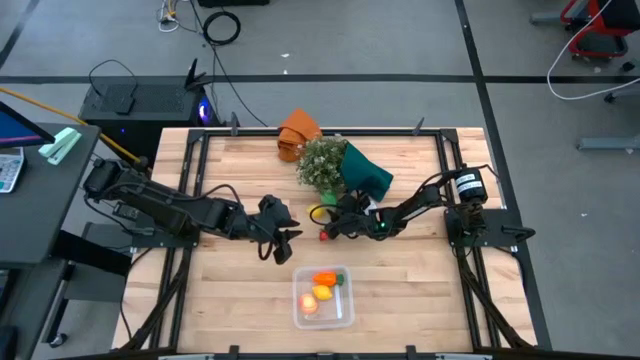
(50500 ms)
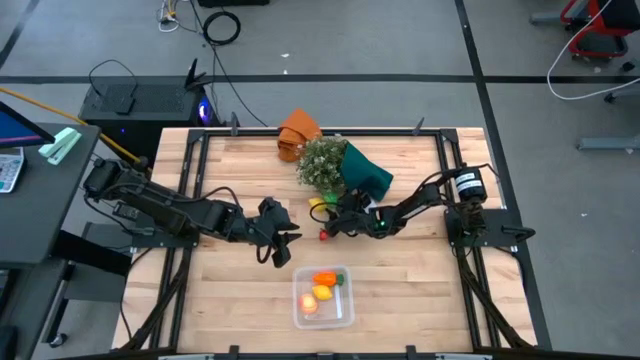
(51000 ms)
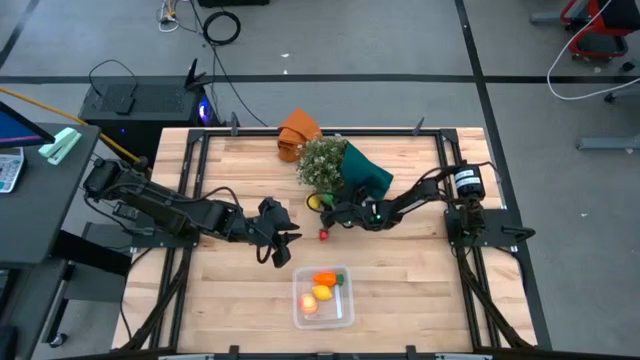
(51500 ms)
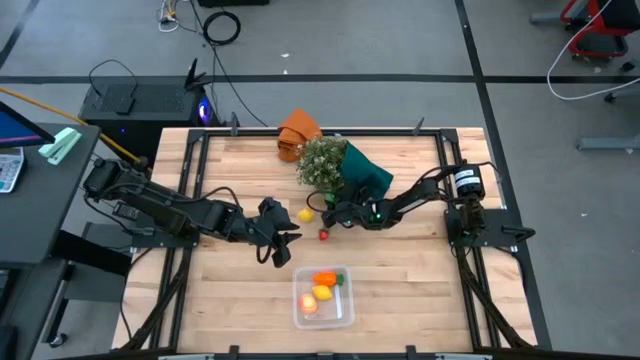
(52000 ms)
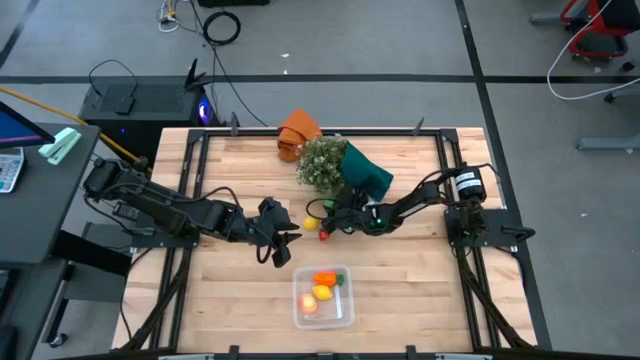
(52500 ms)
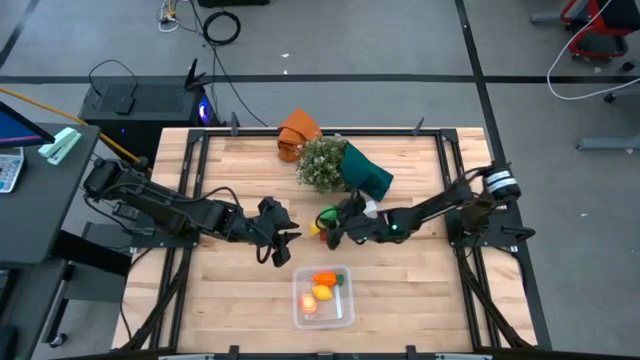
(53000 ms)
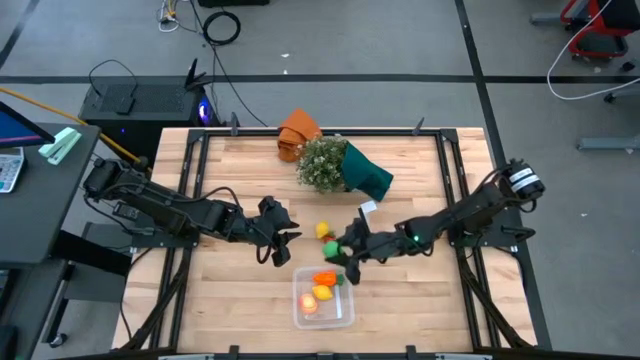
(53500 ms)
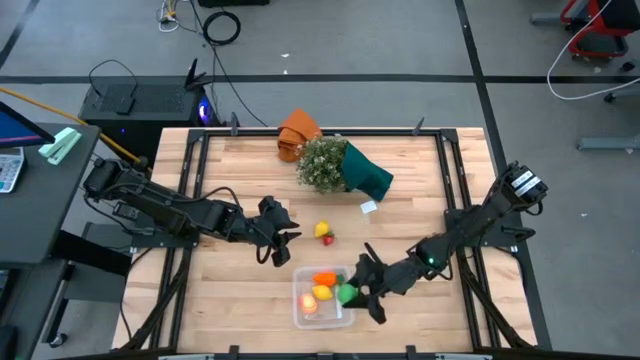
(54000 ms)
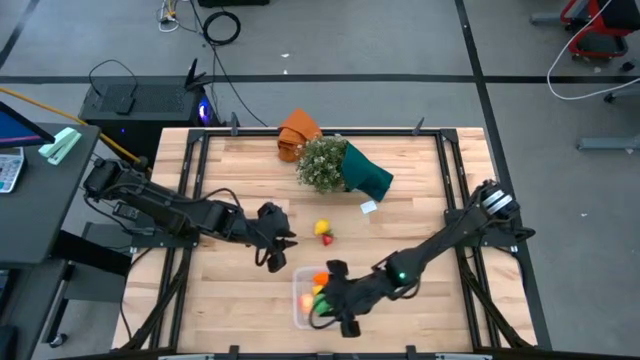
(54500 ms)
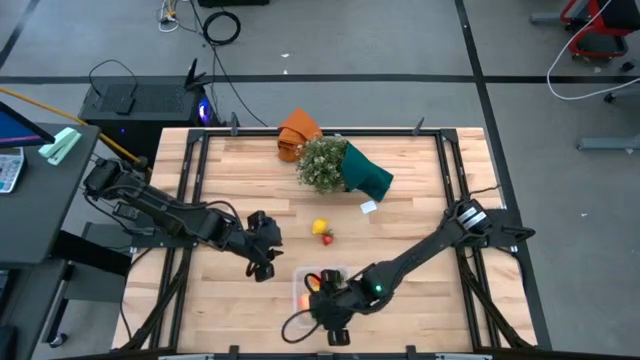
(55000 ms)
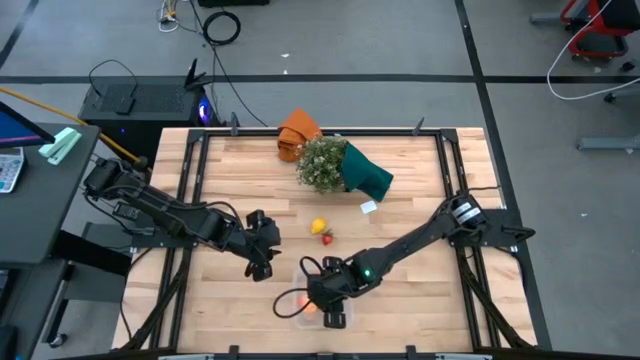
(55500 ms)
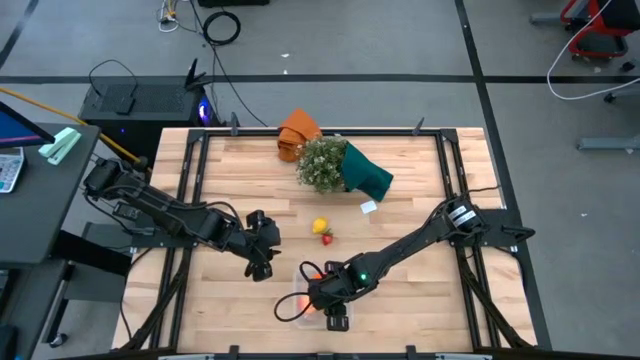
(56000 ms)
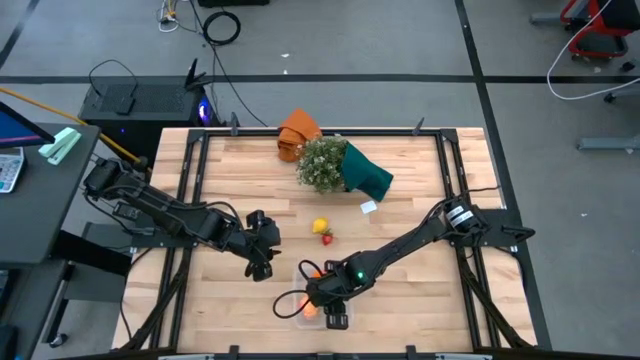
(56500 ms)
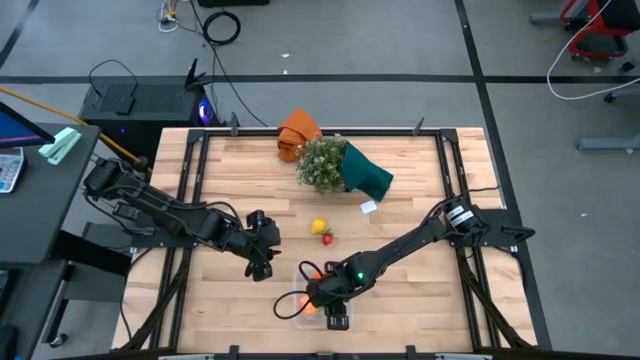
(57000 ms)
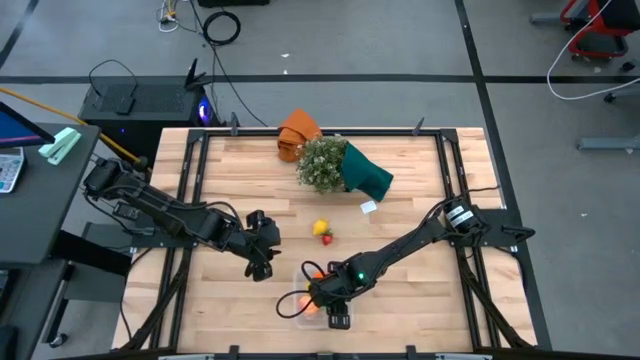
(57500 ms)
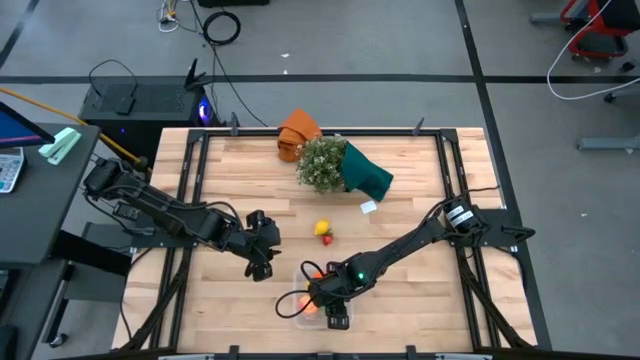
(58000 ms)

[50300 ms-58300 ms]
Task: Pick and placing Produce into tupperware
Put the pear into the transparent container

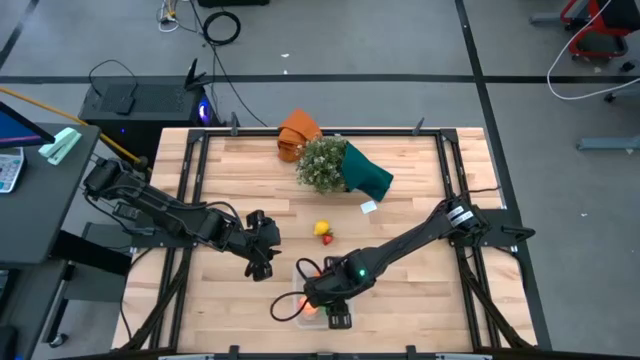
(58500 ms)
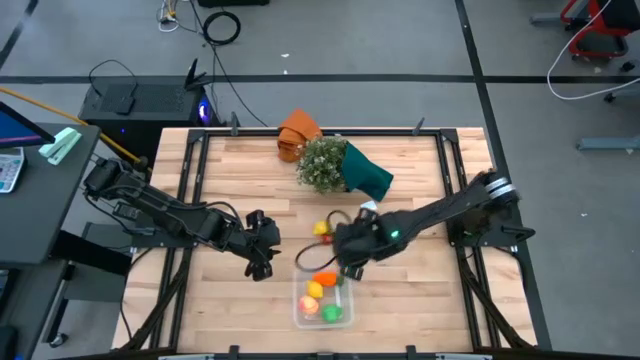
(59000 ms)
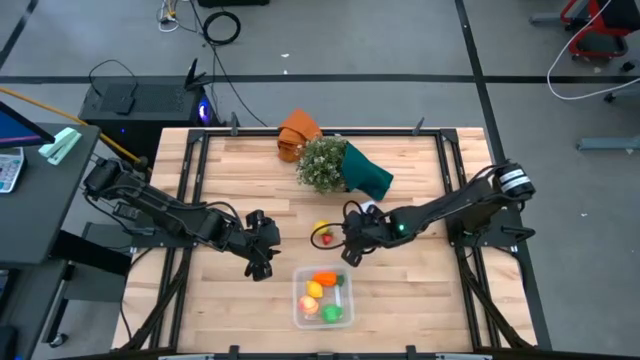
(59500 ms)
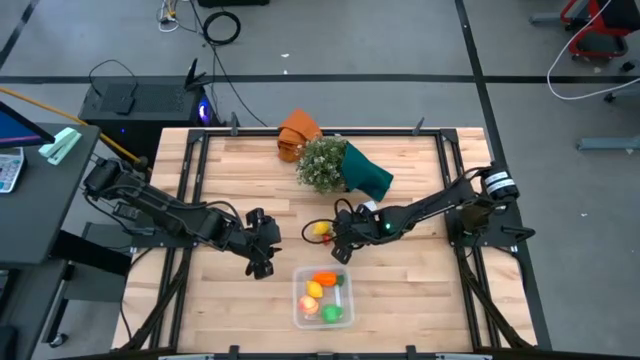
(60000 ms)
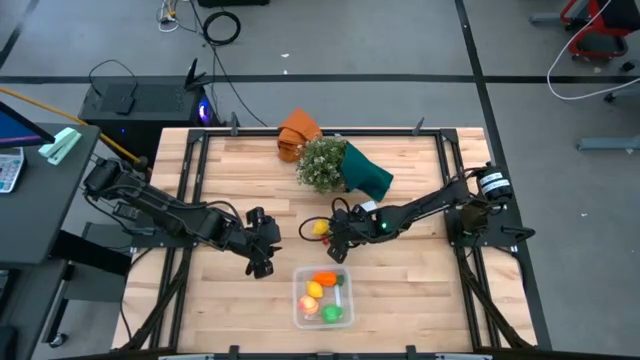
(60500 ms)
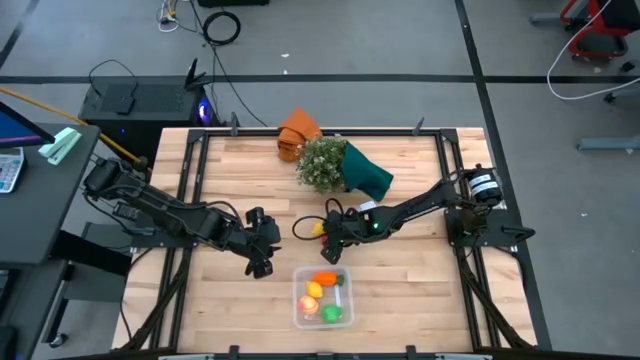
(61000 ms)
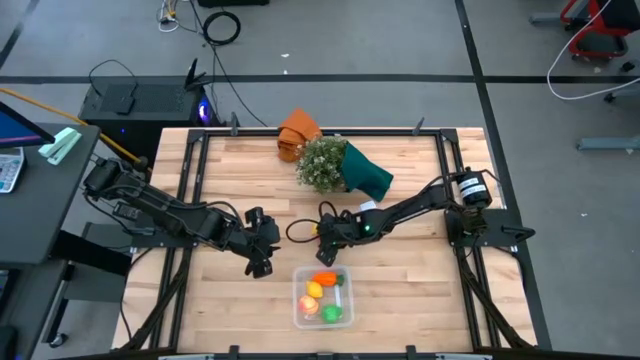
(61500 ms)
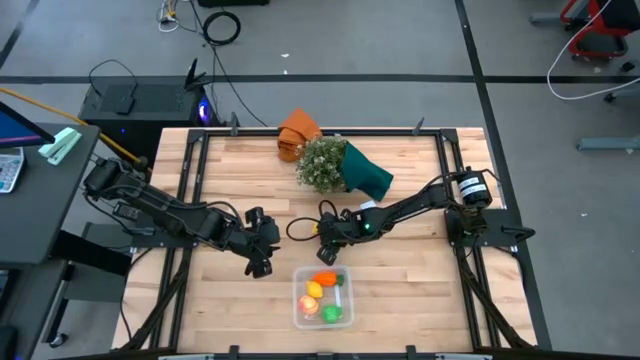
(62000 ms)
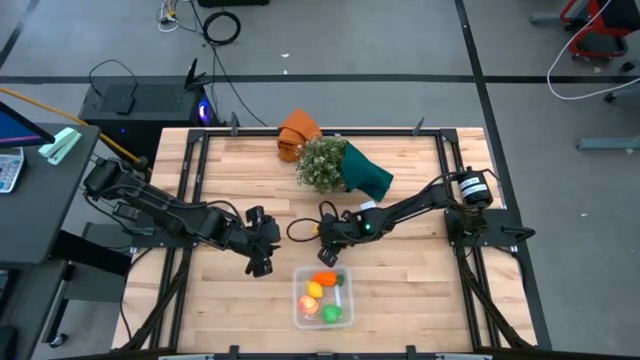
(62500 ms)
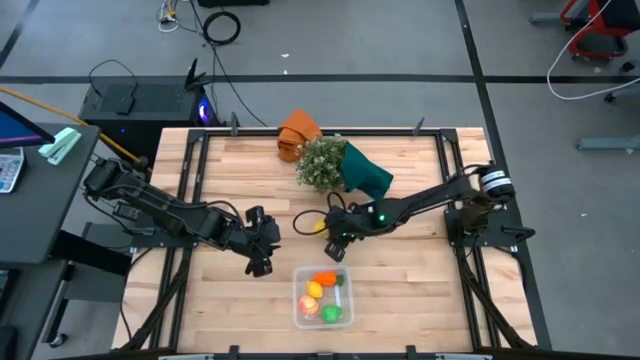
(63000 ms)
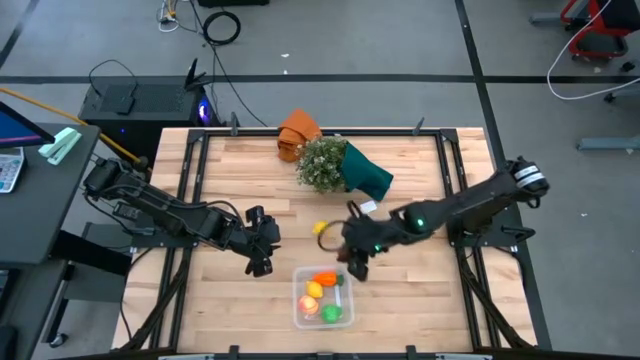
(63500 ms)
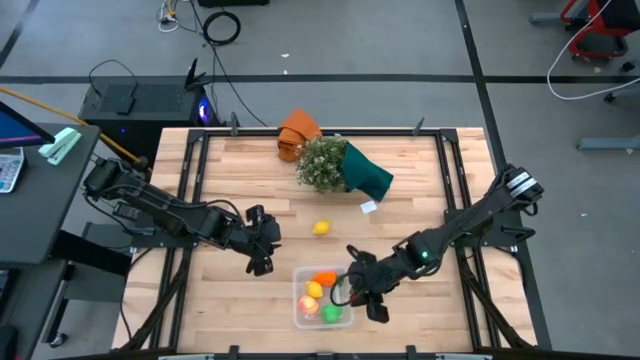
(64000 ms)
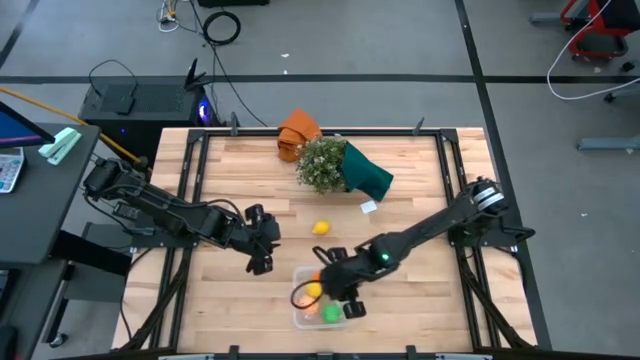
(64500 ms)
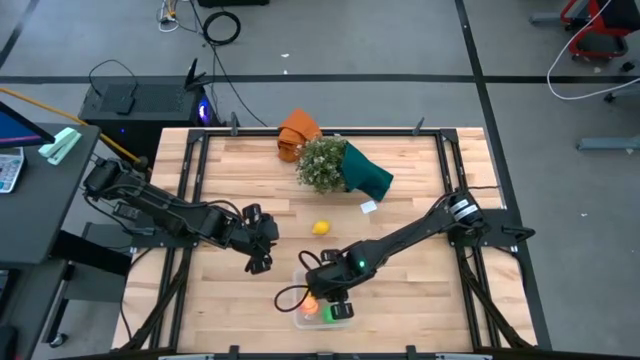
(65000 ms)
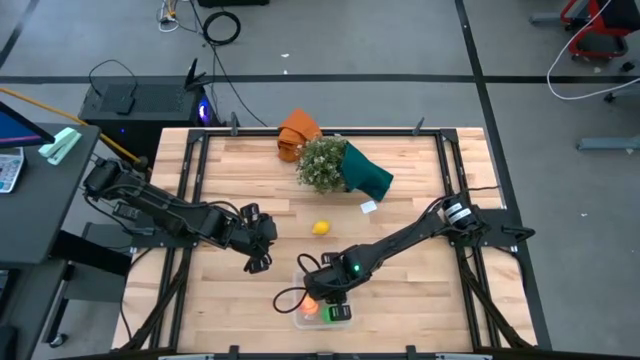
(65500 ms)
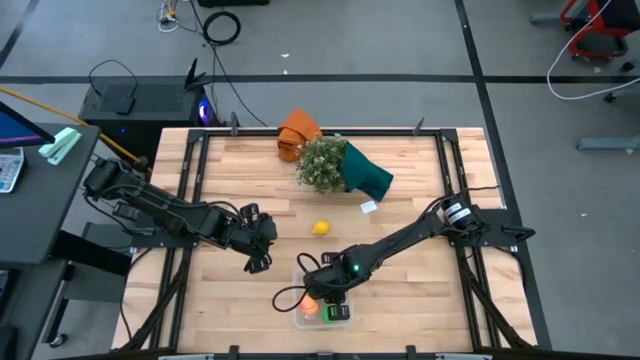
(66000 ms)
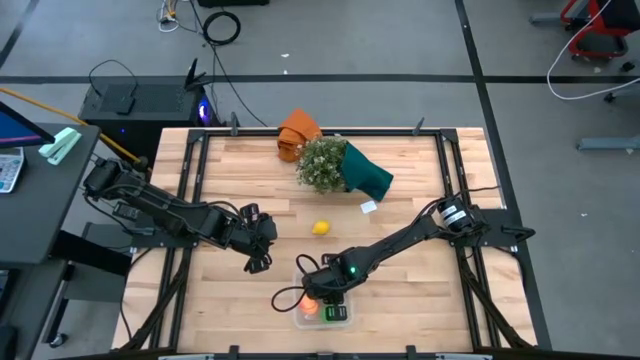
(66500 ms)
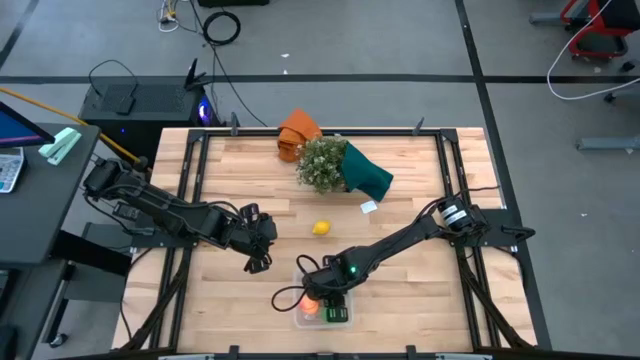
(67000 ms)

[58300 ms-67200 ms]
Put the strawberry into the transparent container

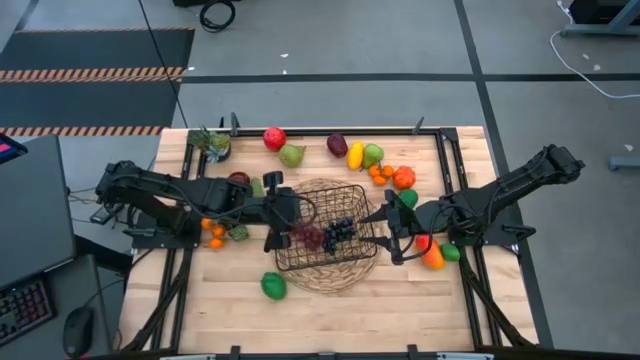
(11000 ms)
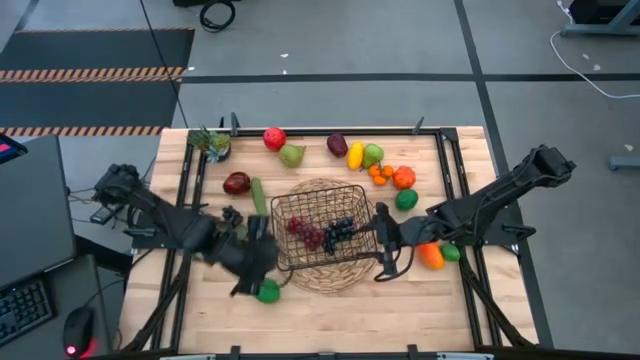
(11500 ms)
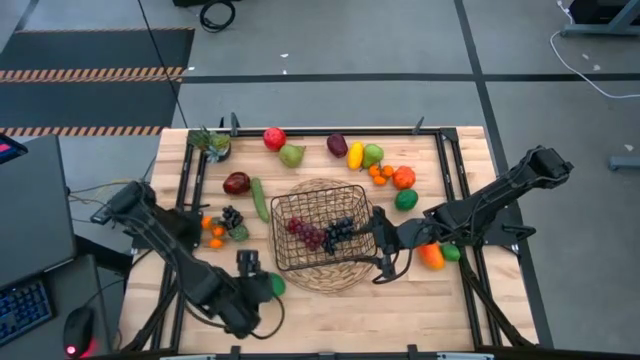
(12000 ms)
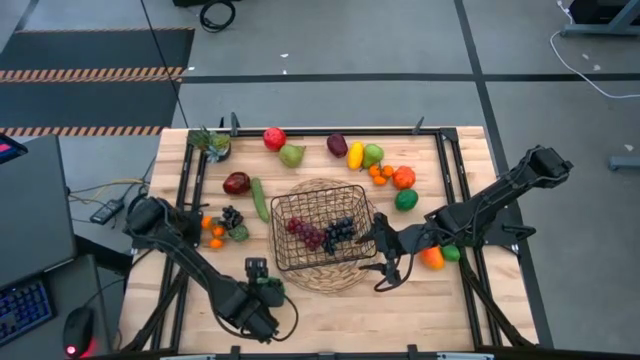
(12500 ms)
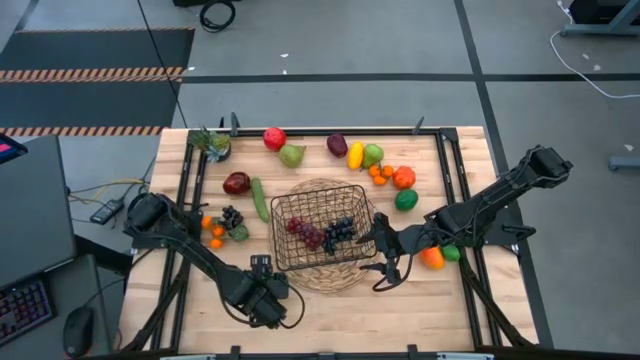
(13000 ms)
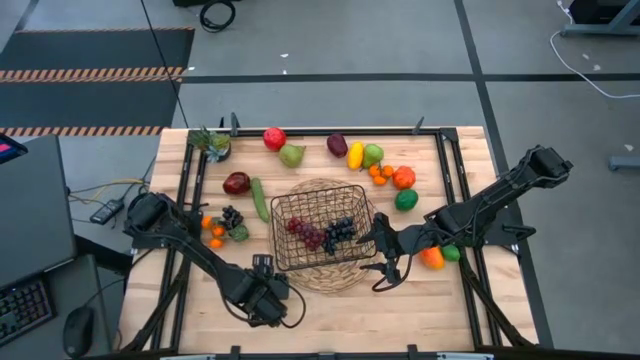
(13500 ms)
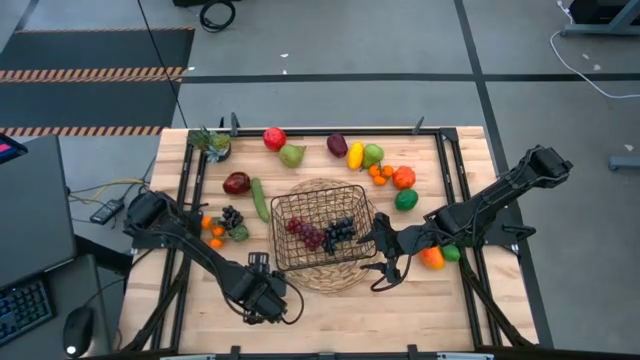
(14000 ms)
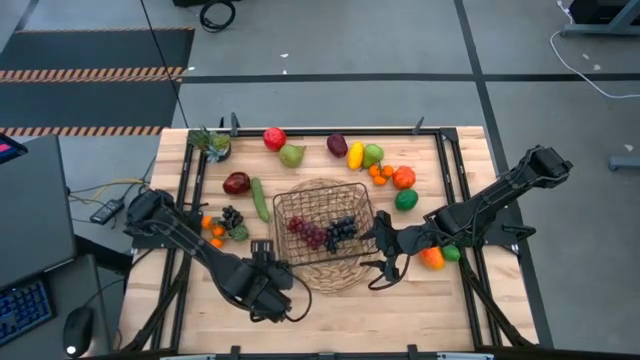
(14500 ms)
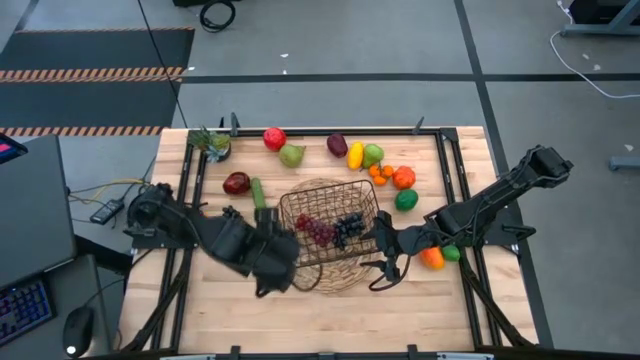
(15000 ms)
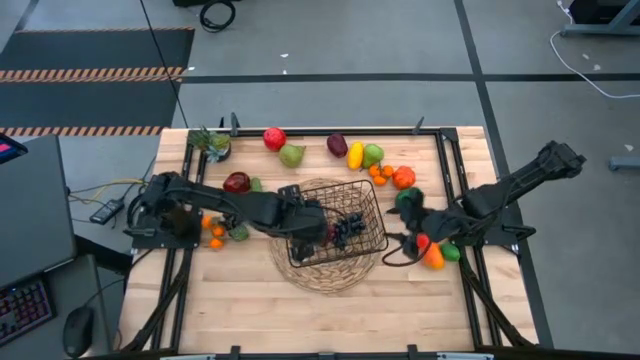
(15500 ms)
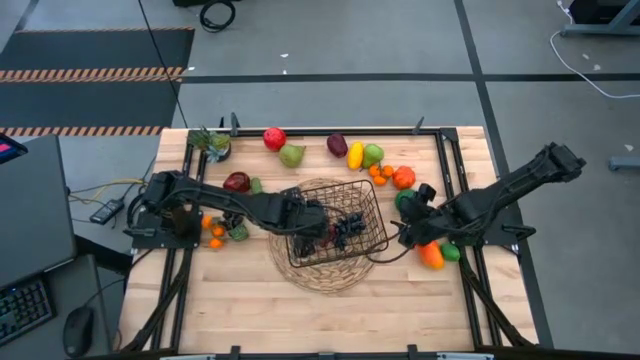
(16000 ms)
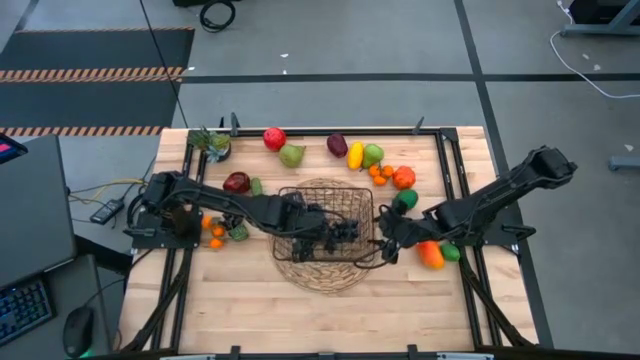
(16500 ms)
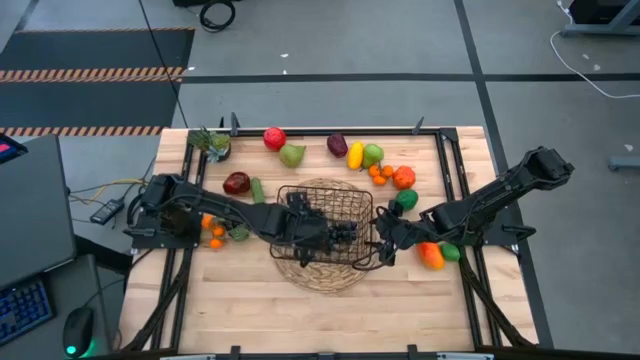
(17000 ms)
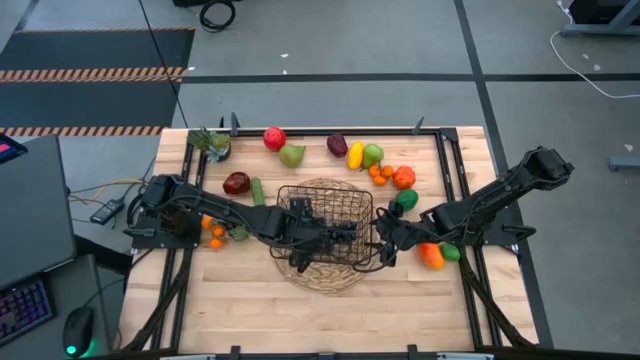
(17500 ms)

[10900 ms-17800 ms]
Task: Build produce basket
Put the bottom left green lime into the black wire basket
